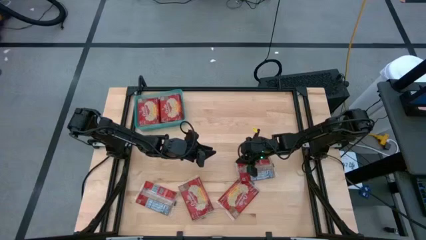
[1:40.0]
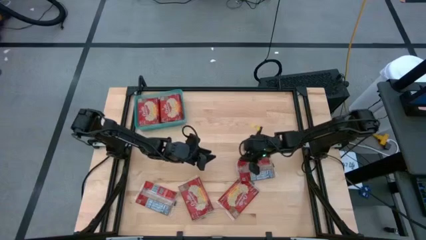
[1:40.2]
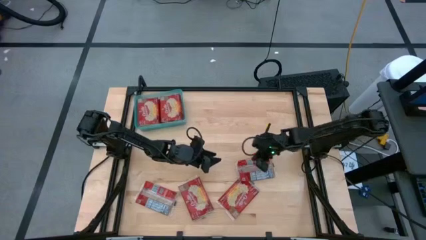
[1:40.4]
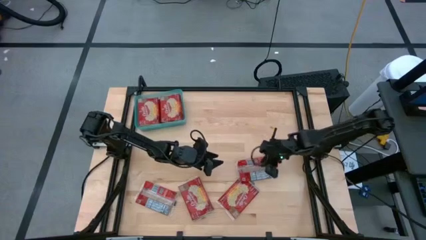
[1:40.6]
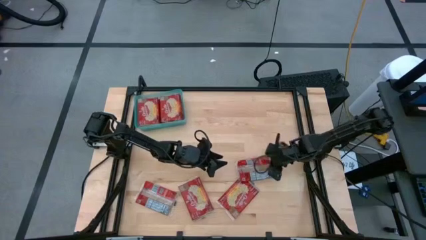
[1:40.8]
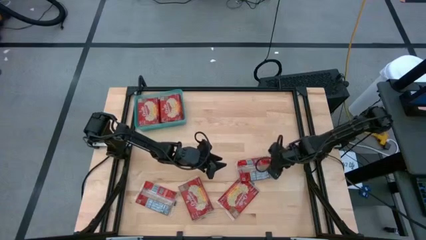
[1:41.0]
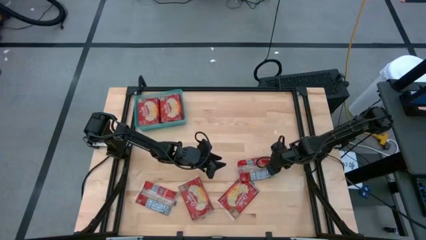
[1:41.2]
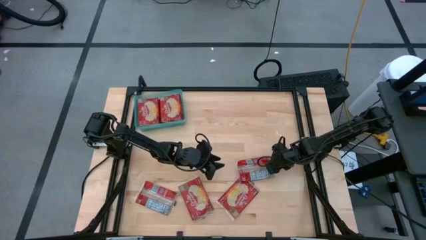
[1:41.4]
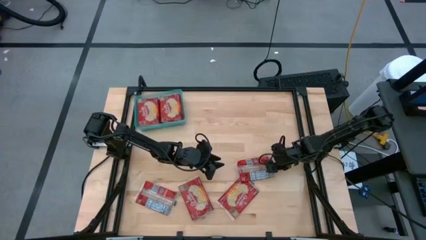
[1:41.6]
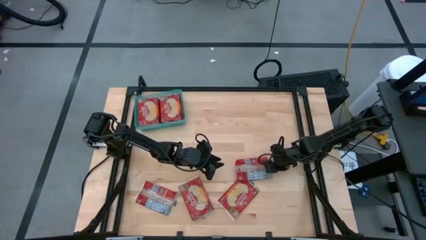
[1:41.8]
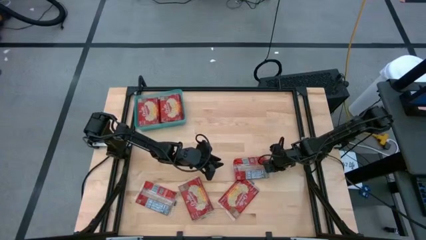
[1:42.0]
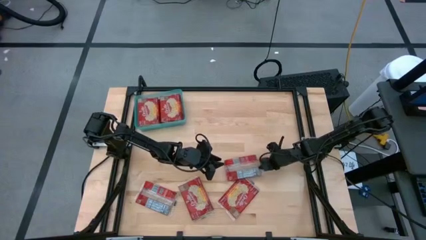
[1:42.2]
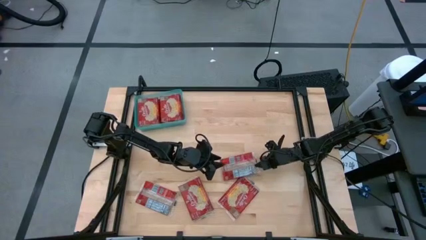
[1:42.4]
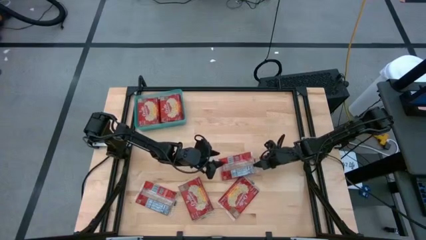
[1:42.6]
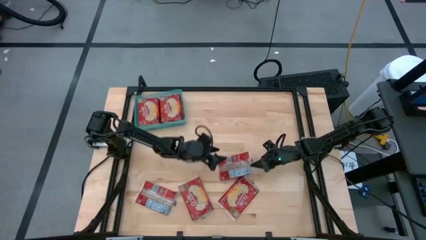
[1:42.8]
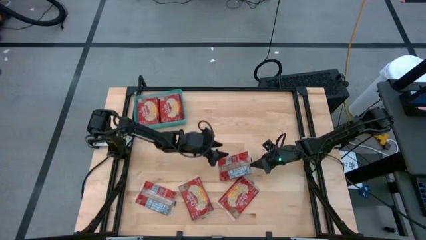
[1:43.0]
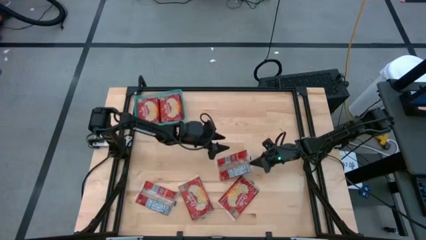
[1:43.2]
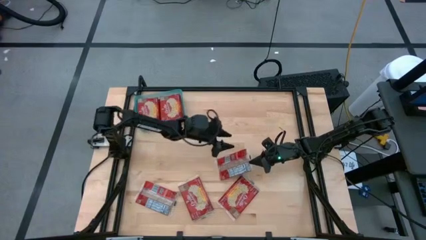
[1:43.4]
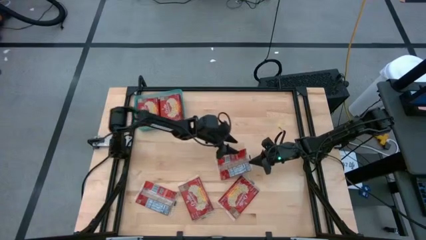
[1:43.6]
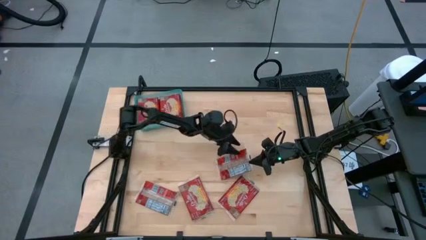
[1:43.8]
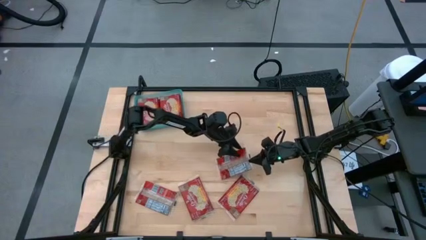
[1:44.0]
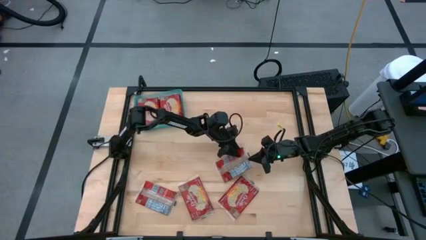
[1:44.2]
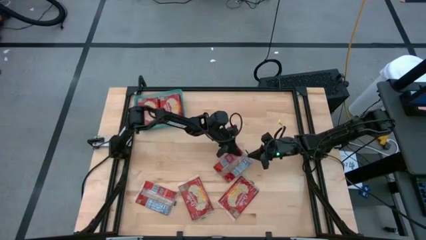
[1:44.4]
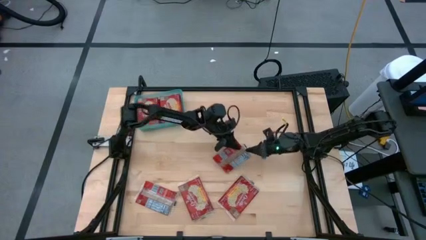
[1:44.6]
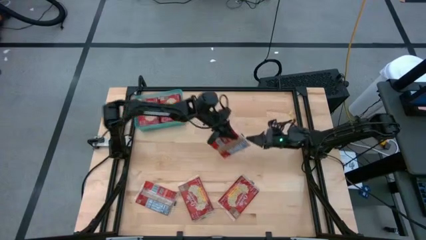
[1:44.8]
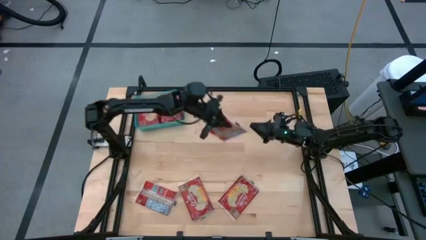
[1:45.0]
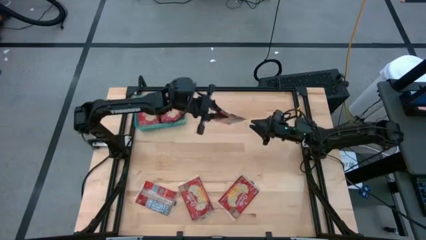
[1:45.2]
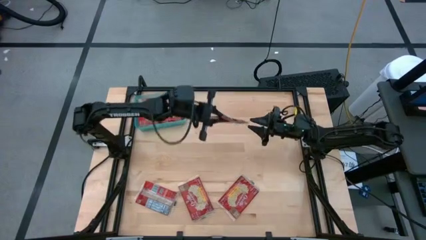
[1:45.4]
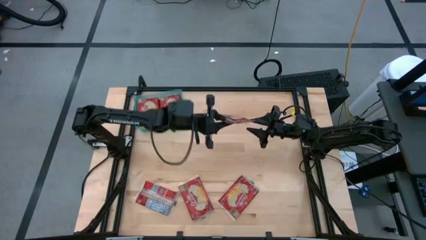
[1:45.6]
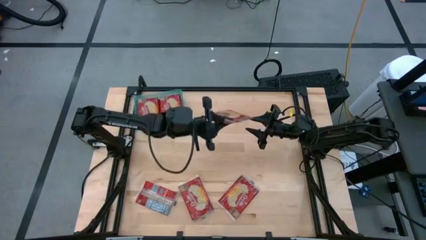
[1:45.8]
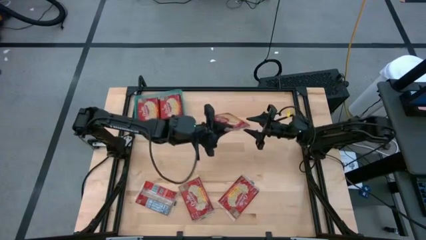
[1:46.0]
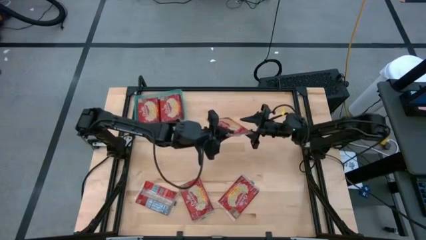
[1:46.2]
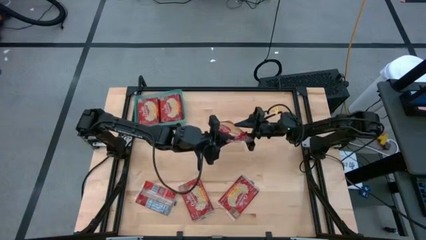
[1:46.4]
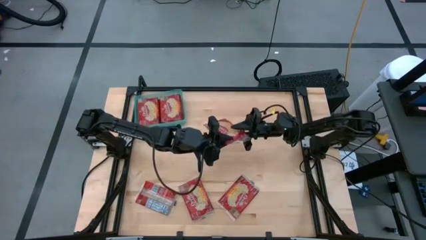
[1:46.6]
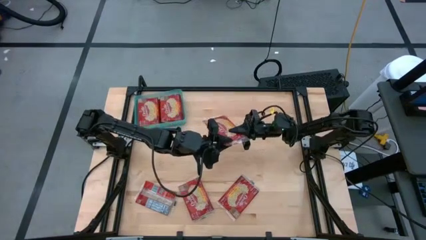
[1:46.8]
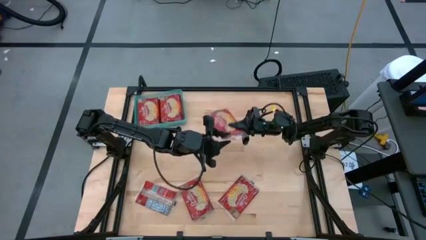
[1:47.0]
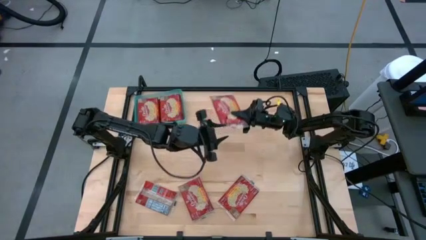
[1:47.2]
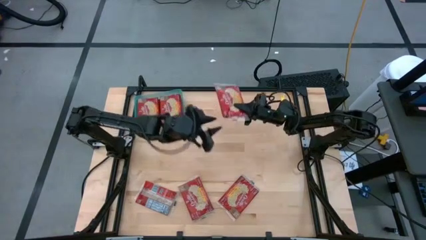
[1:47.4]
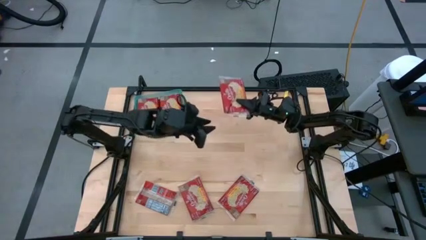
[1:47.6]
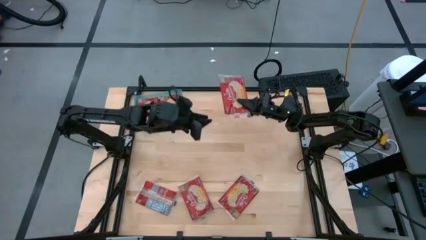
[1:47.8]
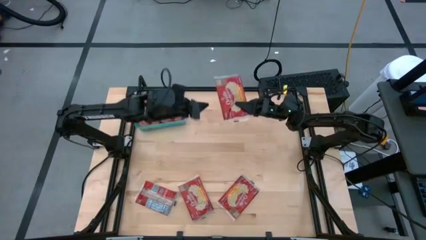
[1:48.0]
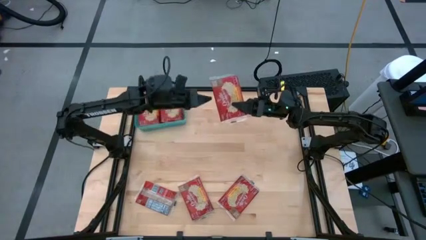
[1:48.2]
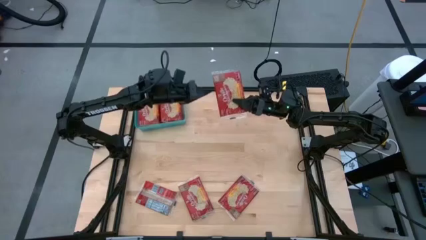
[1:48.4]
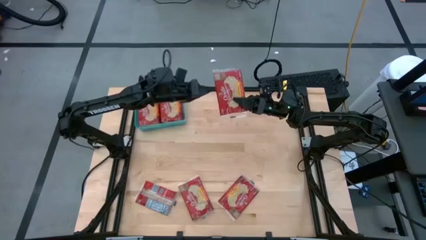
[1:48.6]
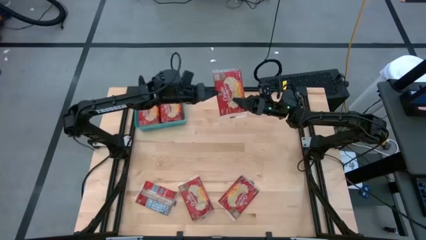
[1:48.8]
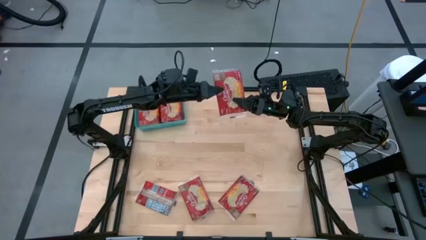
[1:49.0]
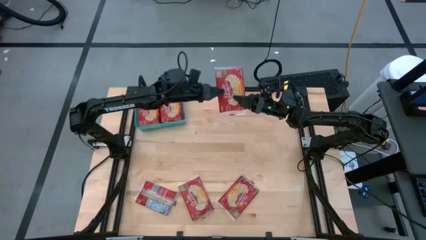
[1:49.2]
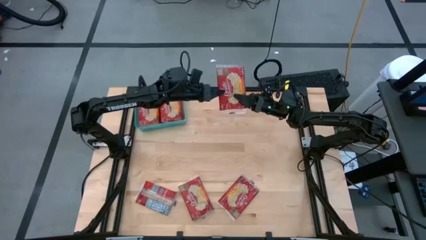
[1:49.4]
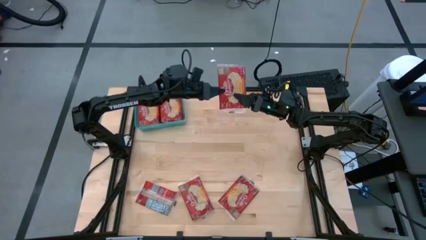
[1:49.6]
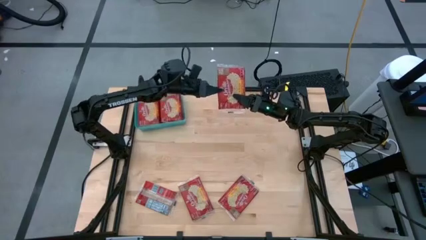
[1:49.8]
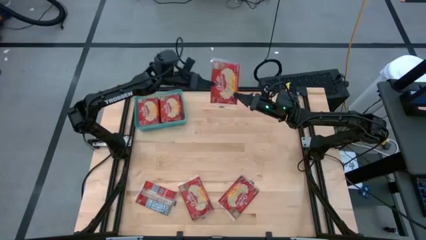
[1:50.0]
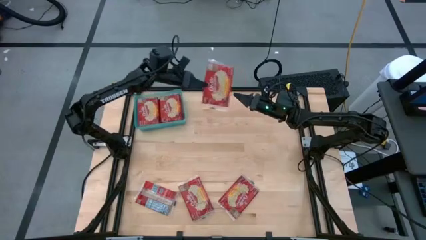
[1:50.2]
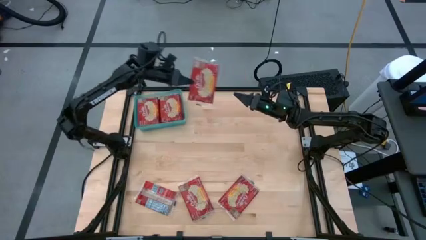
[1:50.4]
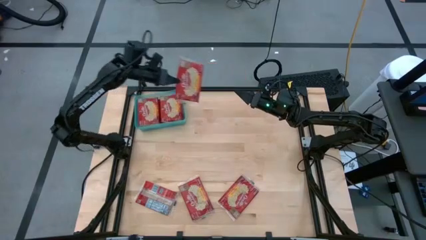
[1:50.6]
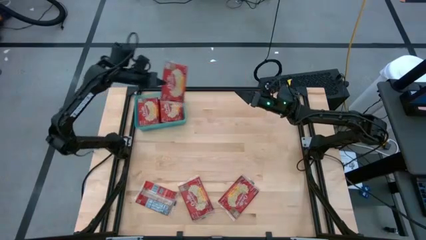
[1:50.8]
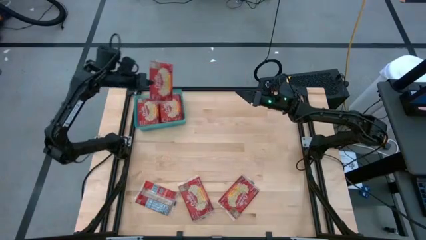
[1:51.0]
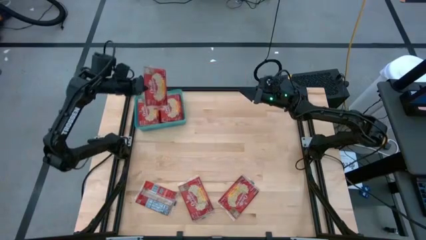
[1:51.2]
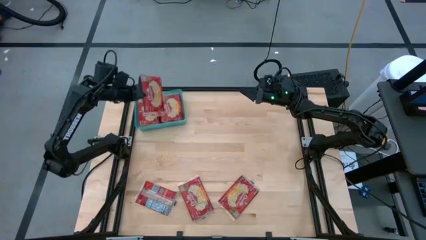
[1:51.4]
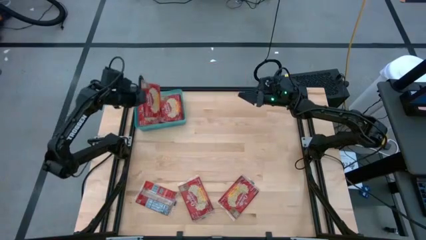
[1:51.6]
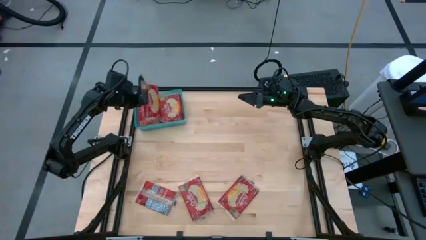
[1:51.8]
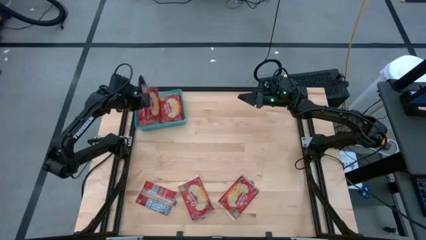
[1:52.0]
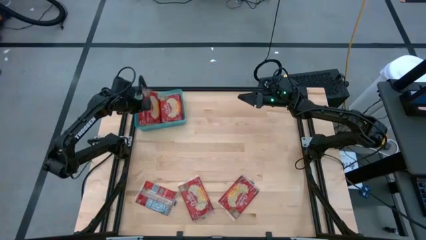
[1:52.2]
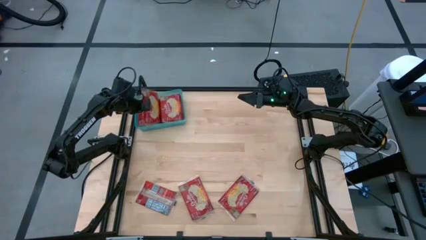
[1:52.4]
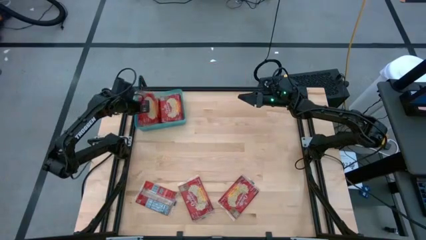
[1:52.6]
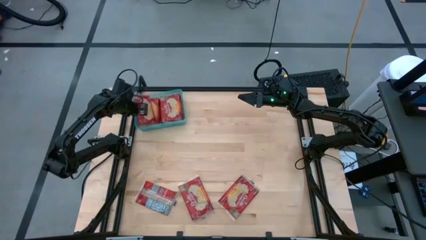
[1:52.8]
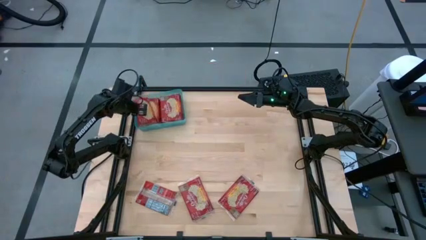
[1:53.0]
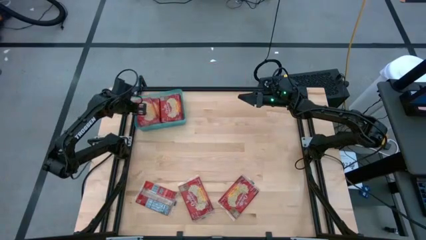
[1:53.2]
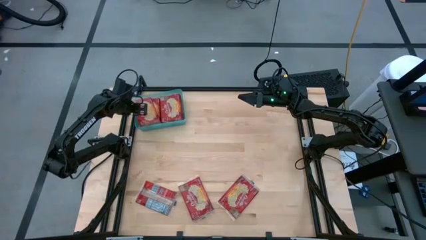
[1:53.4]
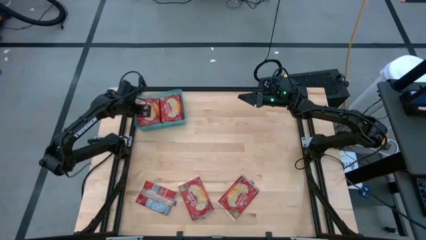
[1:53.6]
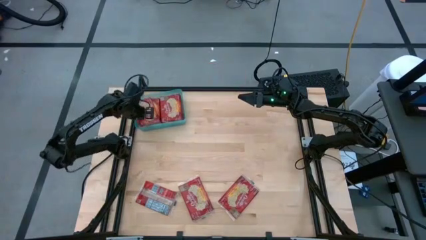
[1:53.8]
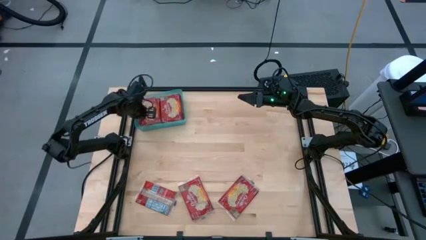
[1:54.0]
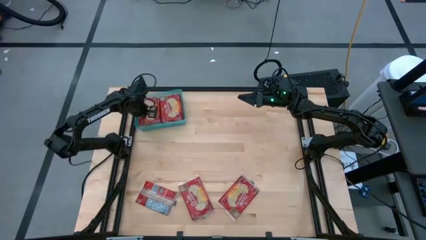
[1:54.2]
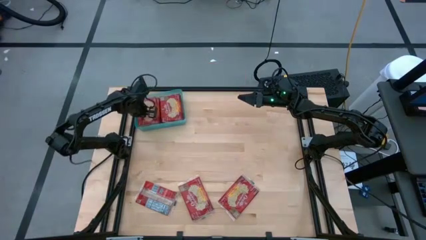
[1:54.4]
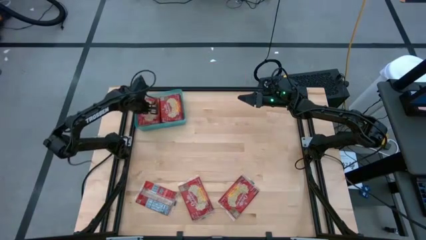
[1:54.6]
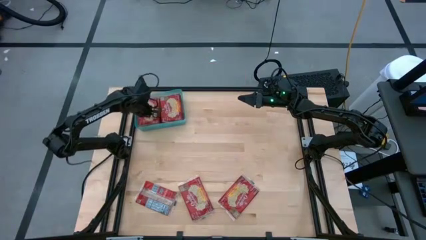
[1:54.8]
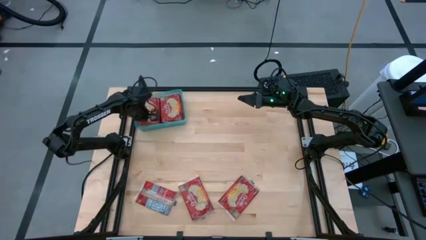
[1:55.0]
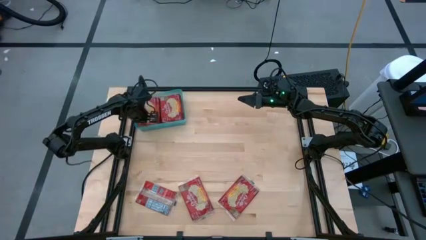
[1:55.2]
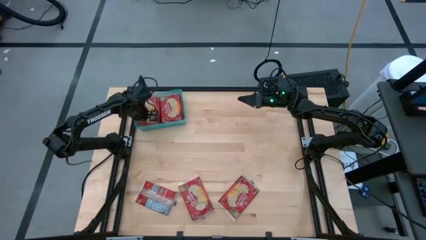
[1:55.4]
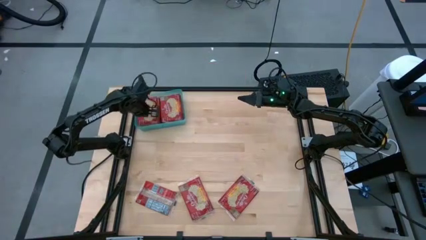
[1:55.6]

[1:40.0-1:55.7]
Task: Sort popcorn bags into baskets
Put the red popcorn bag into the blue bin
